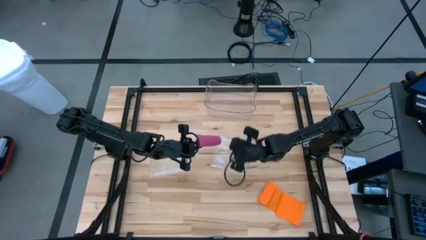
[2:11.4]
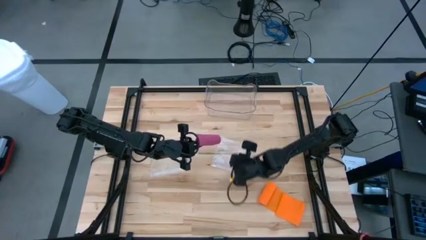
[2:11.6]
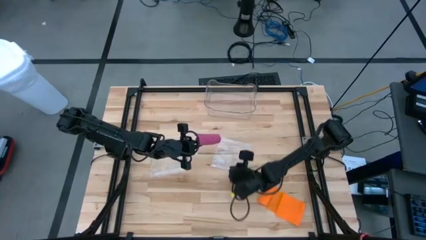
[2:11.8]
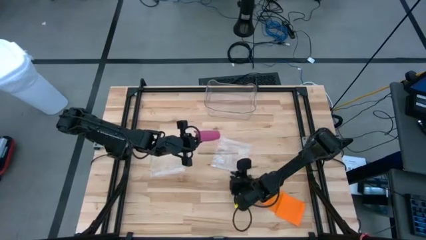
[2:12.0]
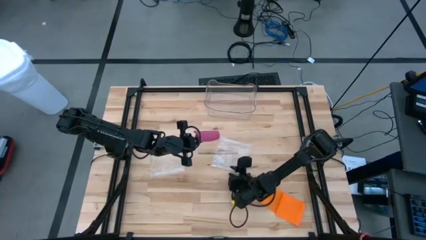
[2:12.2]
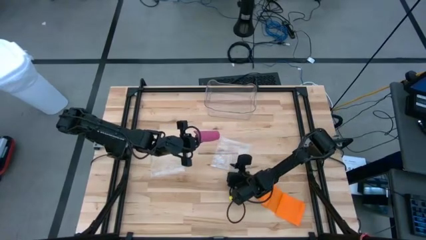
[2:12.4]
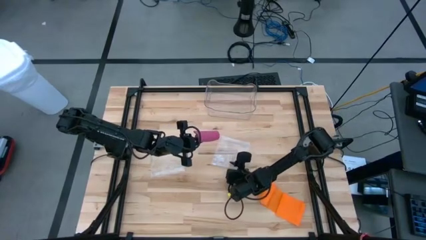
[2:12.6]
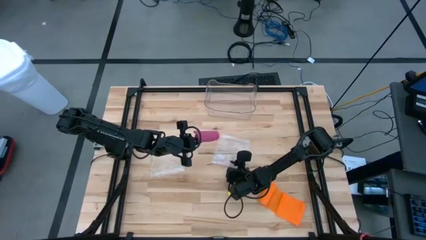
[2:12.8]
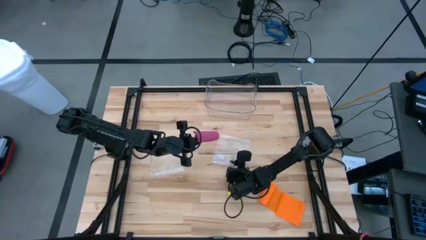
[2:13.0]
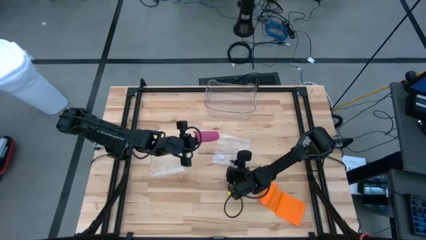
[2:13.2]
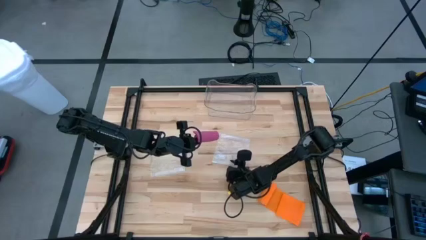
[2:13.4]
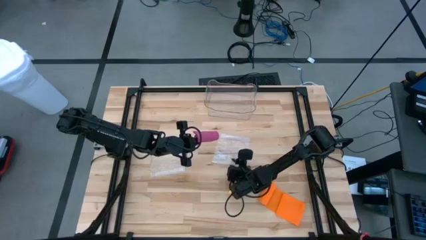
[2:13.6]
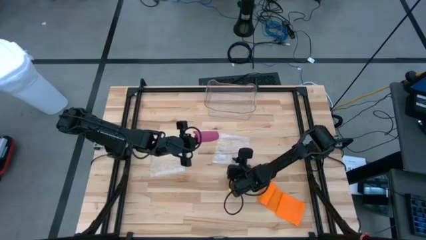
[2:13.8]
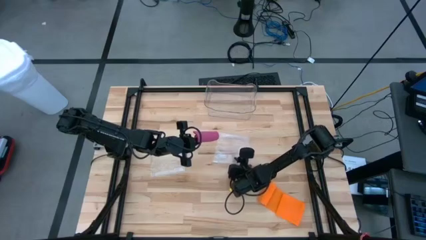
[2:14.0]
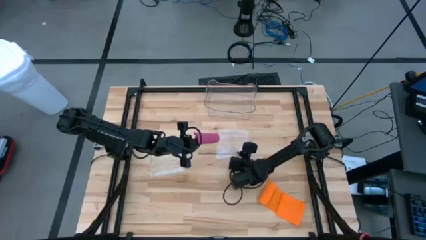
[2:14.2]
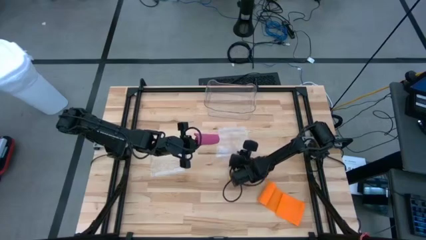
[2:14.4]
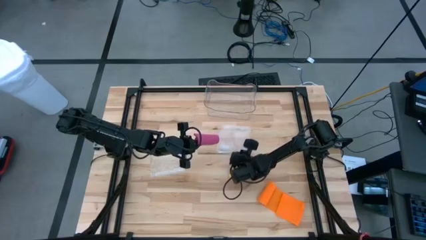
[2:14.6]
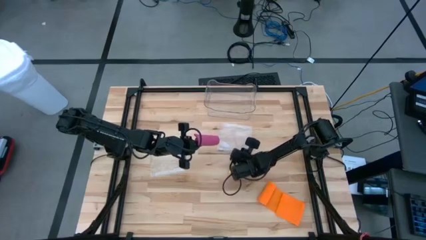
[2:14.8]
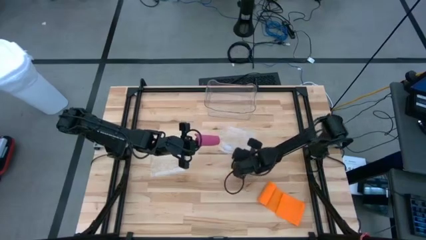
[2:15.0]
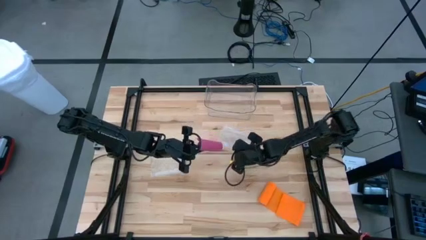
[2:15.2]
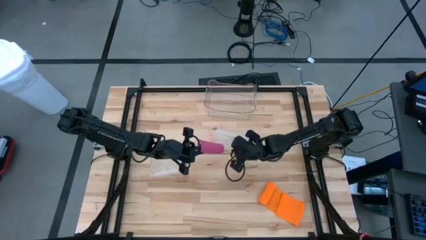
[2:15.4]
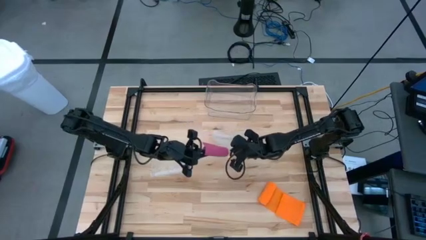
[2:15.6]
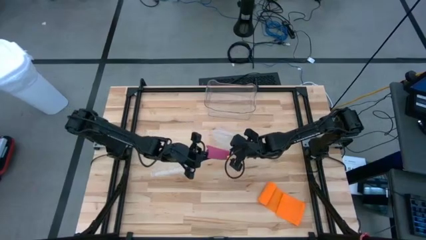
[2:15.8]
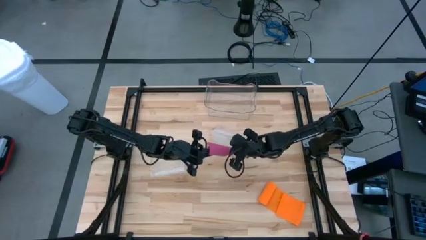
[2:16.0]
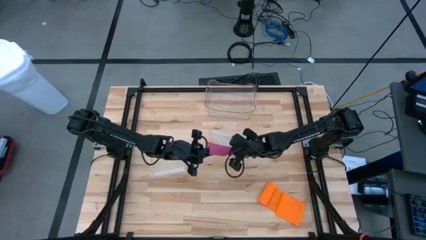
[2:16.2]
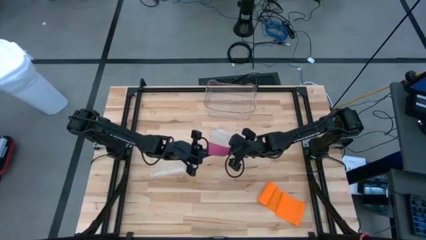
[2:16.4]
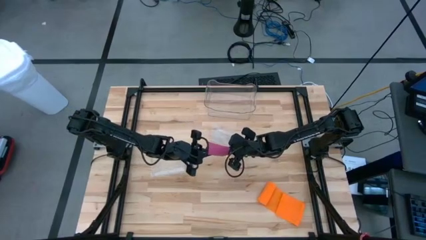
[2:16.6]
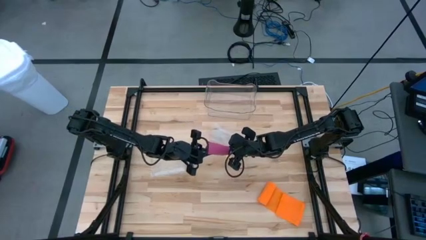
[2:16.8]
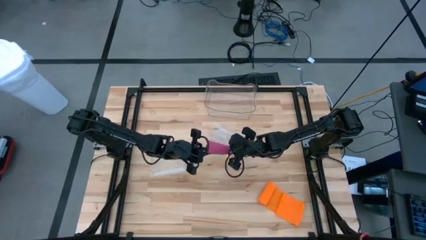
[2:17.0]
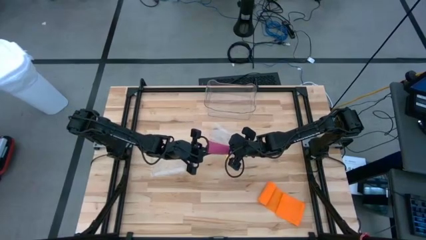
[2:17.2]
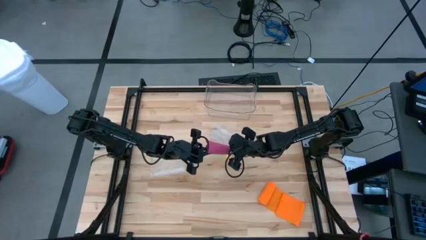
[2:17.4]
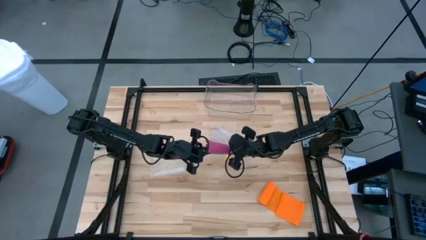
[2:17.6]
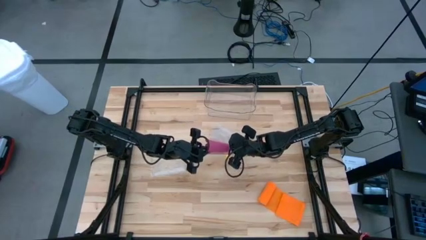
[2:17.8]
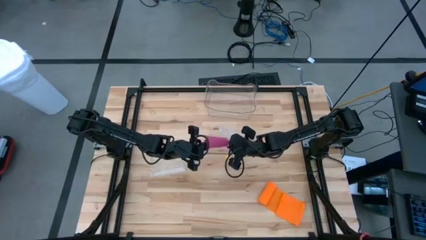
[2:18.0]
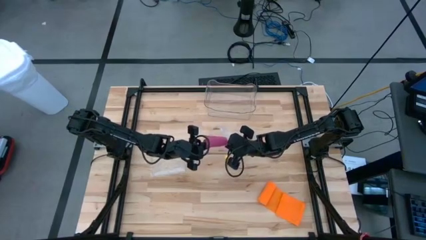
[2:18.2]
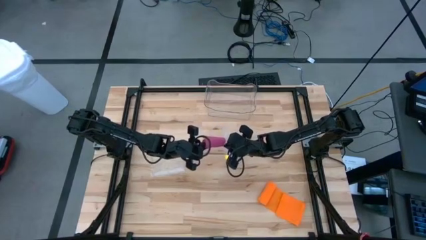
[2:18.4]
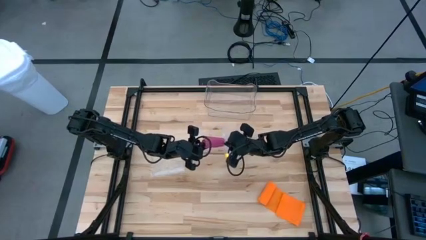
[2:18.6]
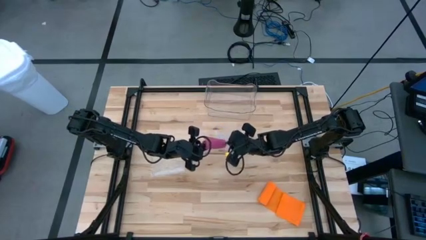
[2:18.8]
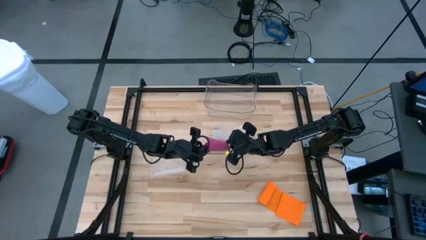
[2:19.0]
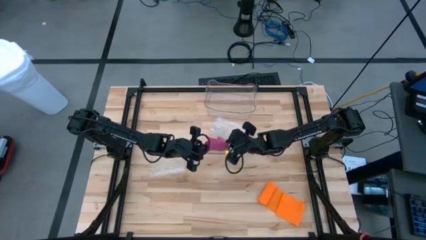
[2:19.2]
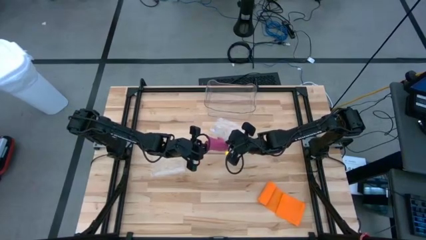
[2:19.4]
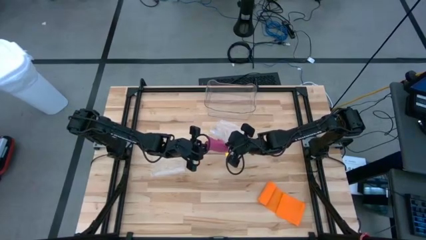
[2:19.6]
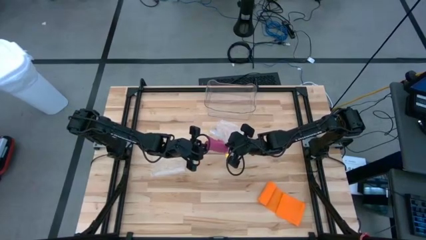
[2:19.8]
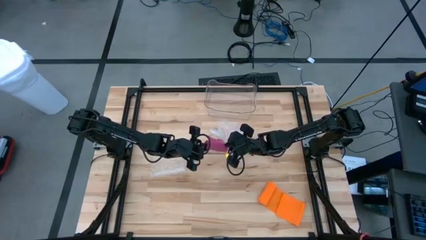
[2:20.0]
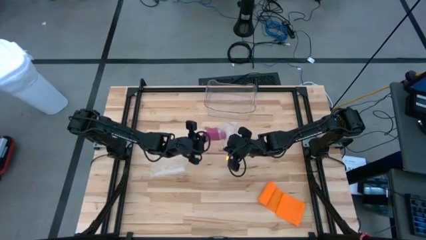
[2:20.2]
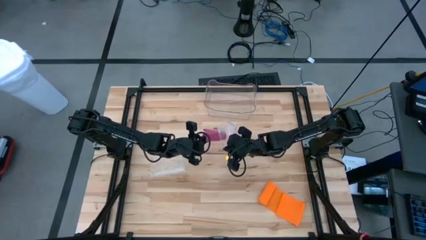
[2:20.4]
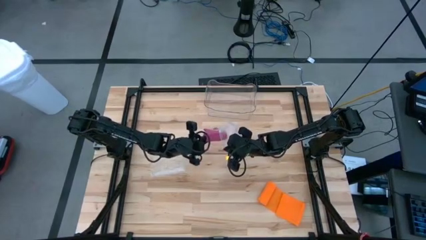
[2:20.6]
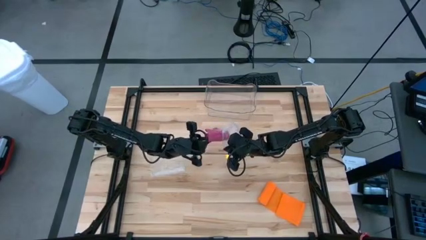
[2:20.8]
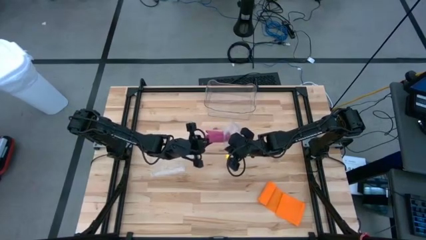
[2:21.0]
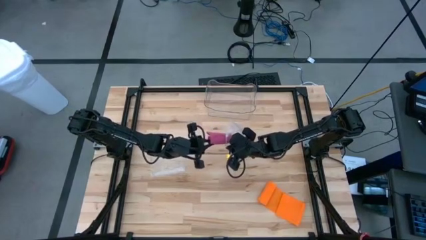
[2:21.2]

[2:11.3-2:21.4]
Task: Roll bandage
Put the pink bandage into the zip bag

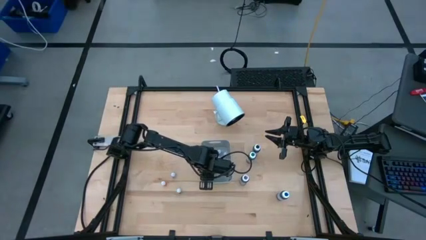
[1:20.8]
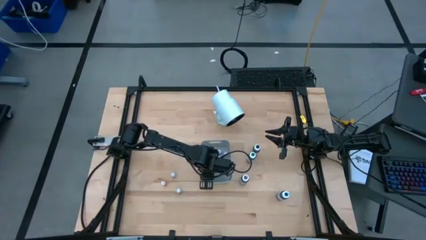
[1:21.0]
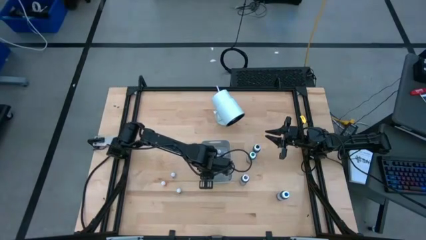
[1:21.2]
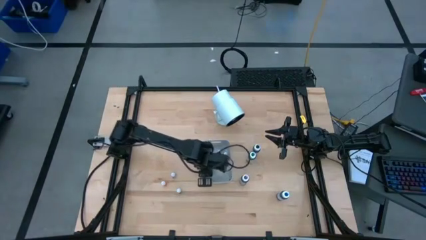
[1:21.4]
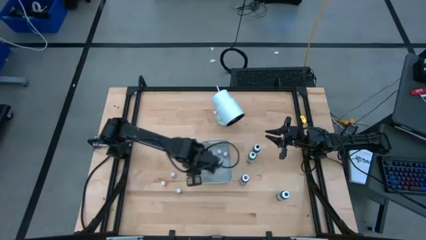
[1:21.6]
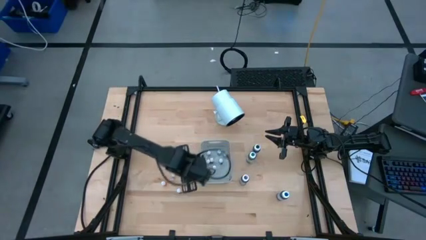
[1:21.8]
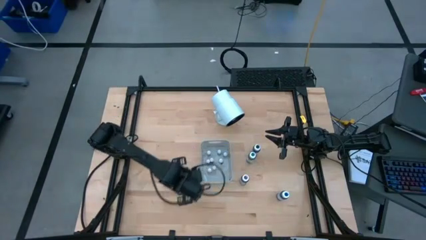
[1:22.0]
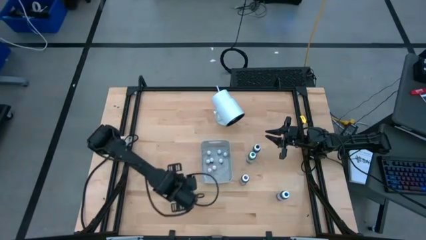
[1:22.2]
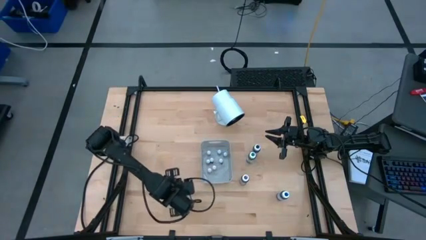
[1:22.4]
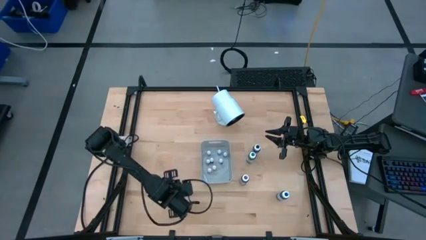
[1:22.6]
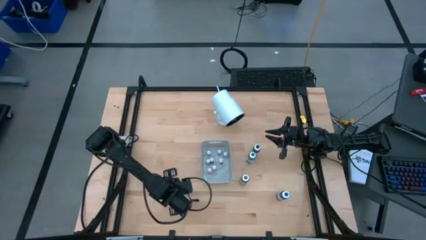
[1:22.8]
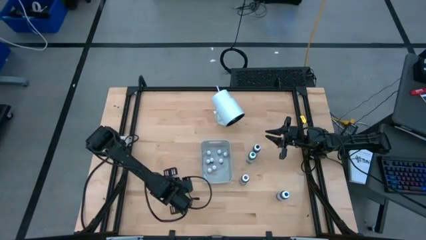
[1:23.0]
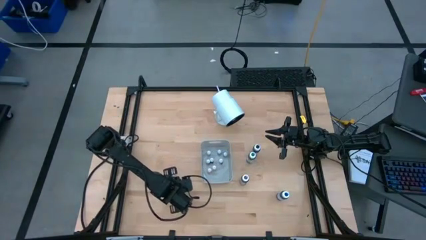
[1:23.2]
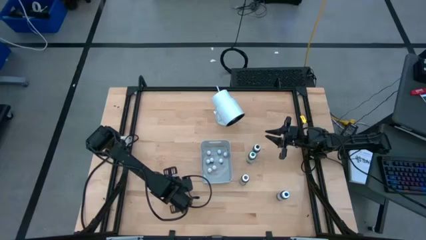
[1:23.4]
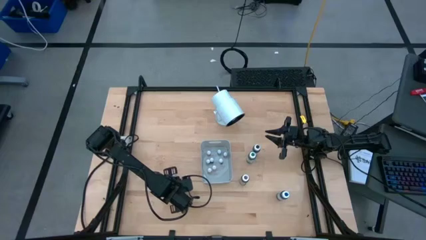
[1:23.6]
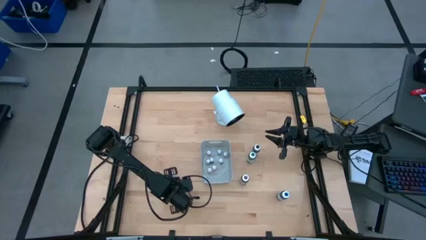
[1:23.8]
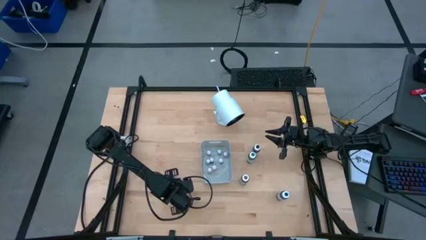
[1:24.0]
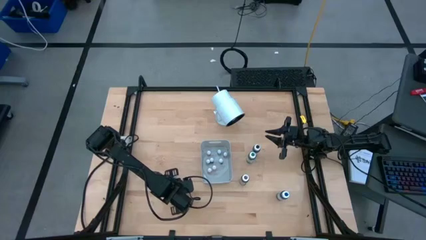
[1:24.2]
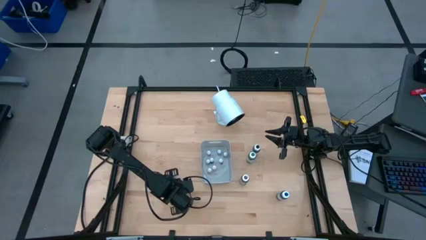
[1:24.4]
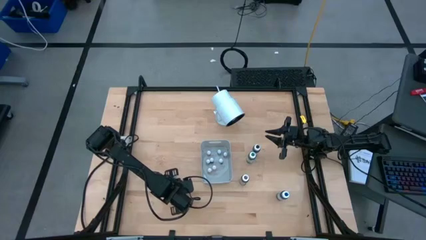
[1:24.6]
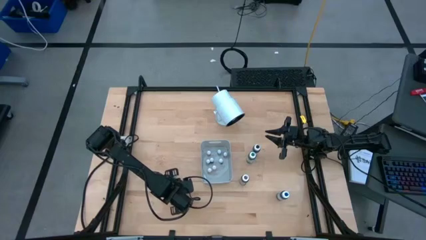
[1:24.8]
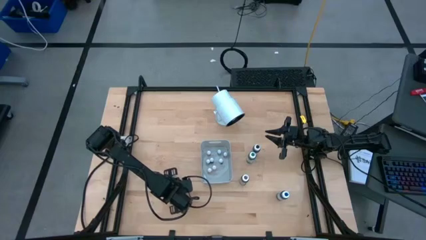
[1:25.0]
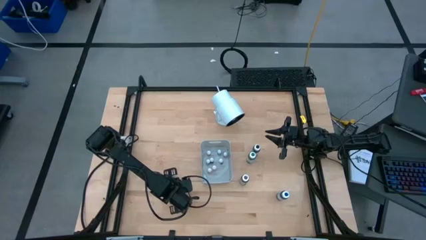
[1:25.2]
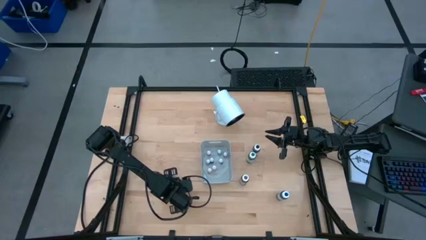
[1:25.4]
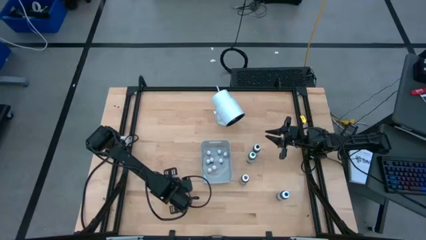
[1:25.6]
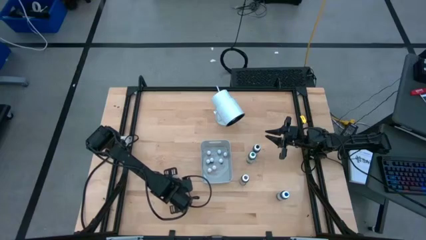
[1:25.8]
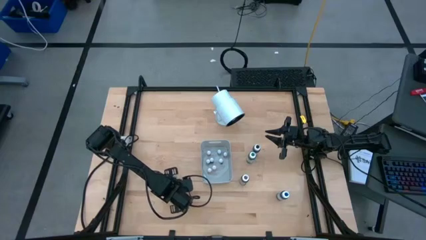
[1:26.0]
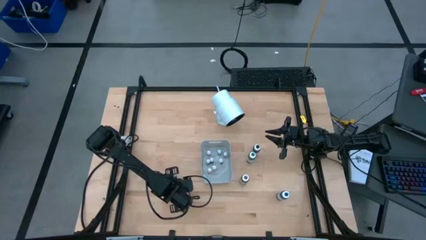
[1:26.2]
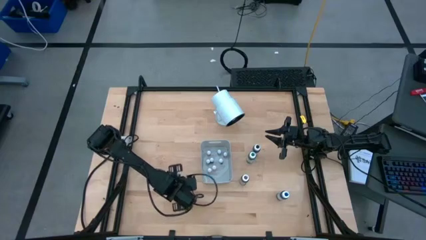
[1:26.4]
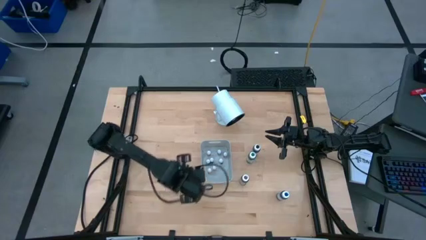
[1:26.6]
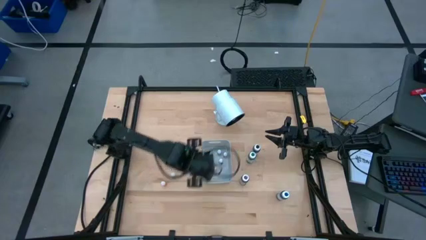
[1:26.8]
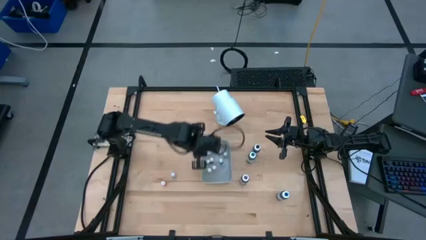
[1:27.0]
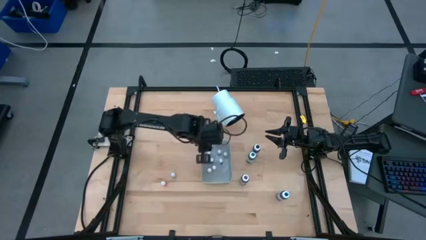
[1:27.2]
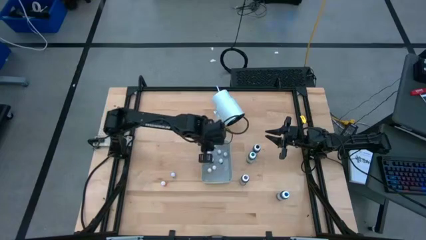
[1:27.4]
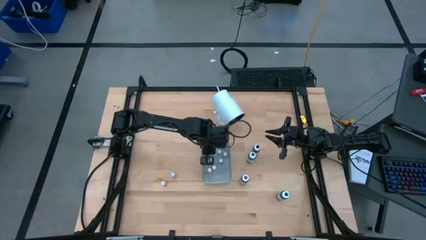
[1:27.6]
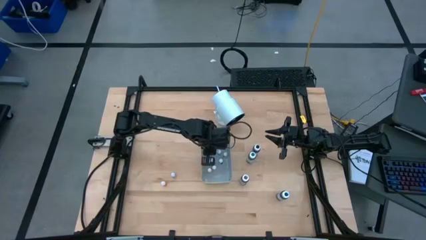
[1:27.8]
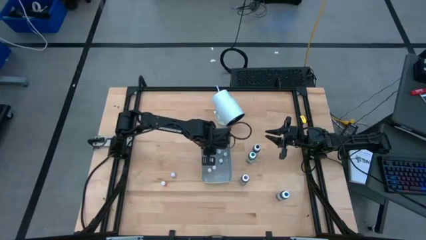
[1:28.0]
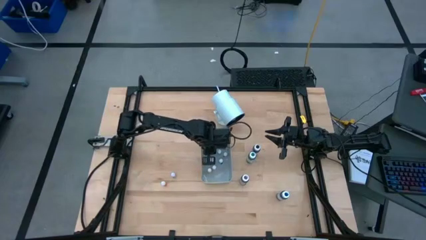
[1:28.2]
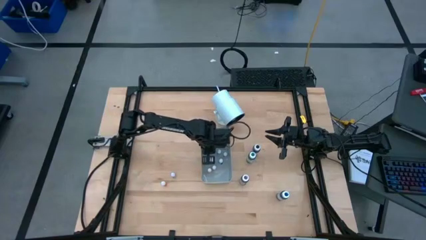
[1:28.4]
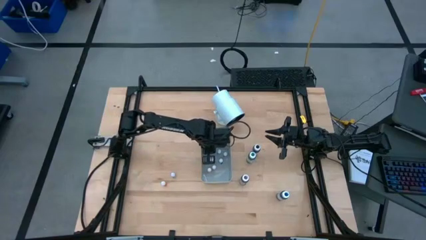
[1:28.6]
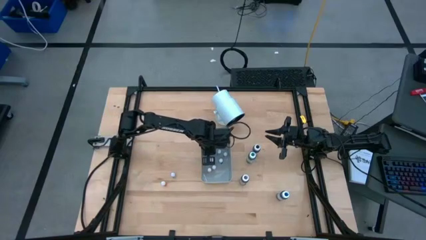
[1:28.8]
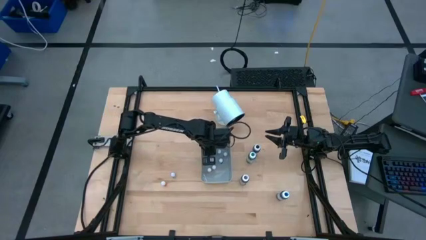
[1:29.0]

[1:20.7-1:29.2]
Task: Pick & Place food coloring
Put the small violet food coloring bottle into the gray bin
